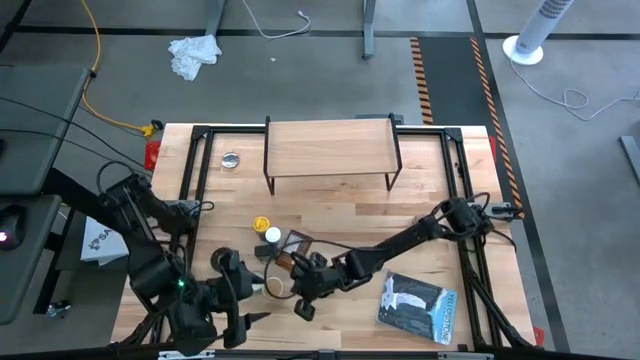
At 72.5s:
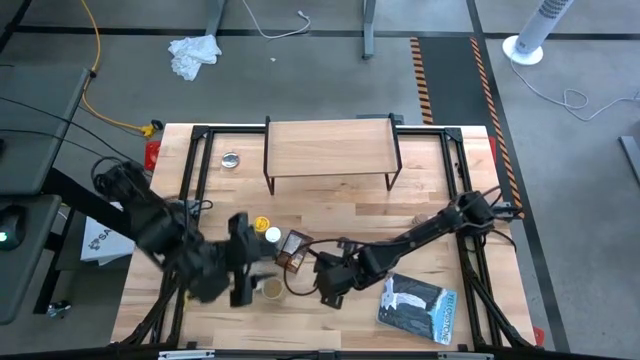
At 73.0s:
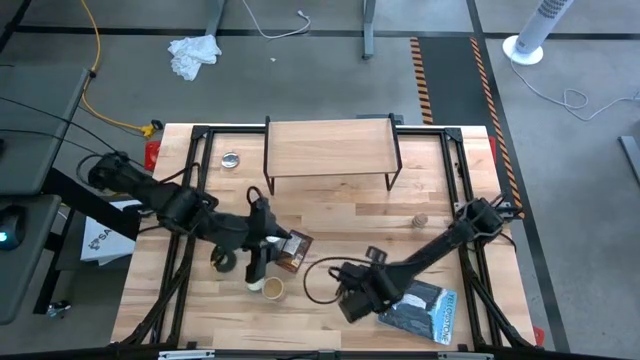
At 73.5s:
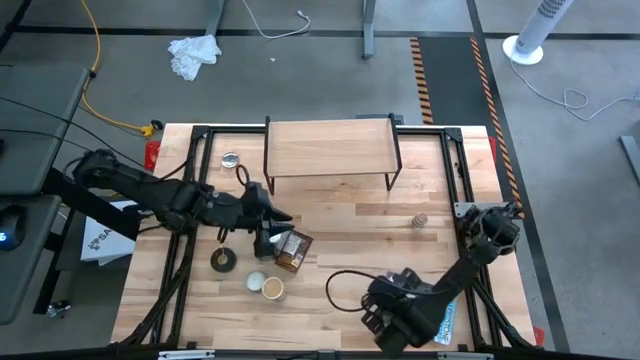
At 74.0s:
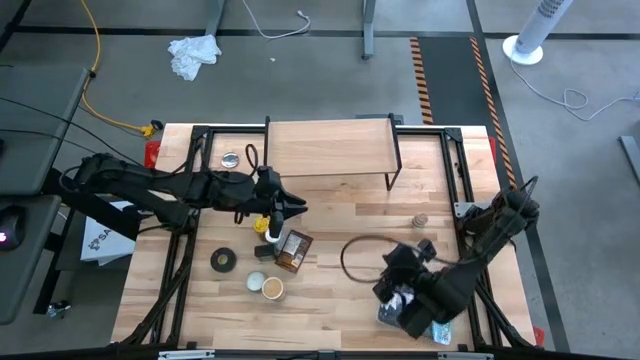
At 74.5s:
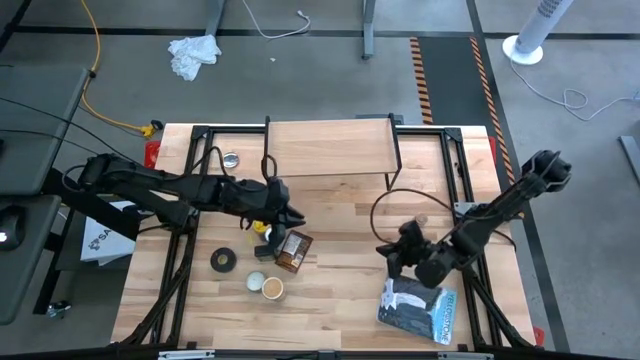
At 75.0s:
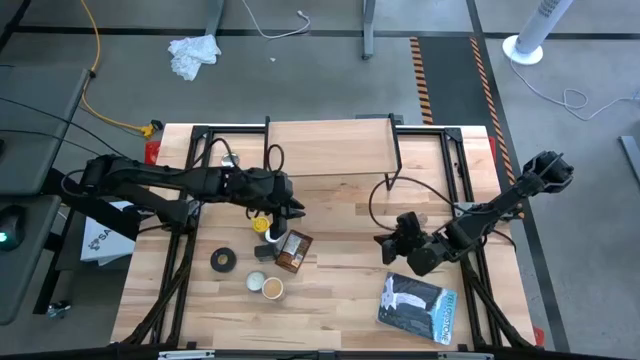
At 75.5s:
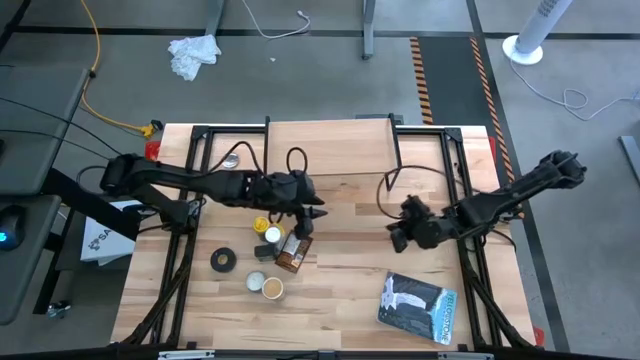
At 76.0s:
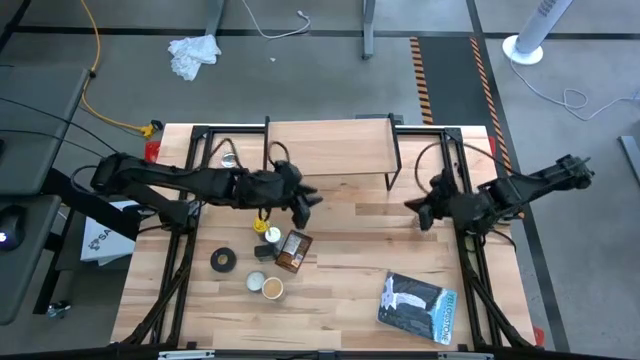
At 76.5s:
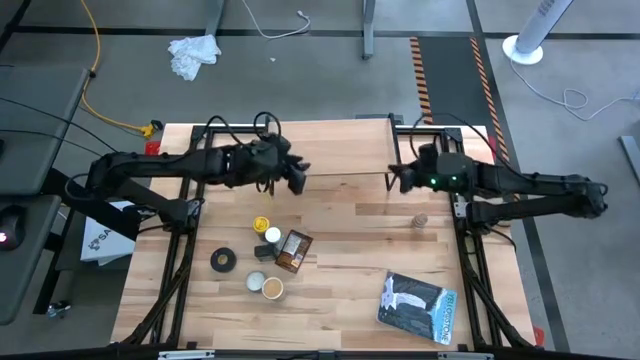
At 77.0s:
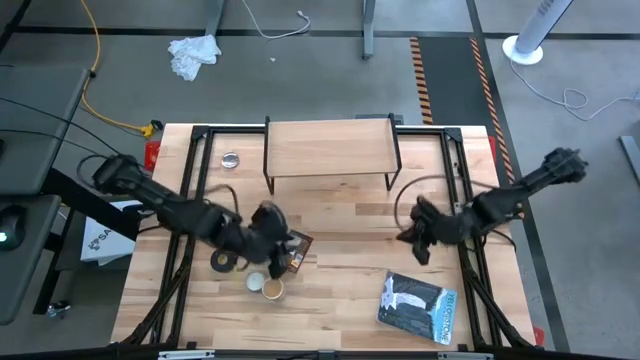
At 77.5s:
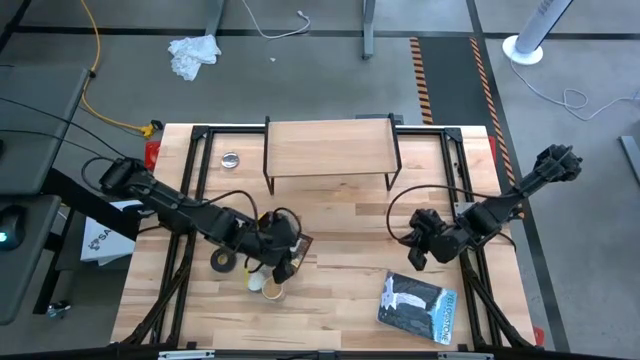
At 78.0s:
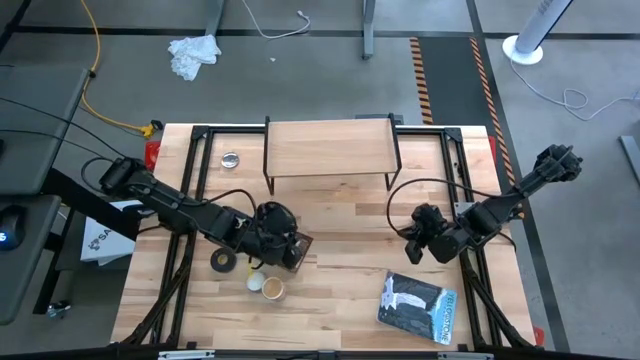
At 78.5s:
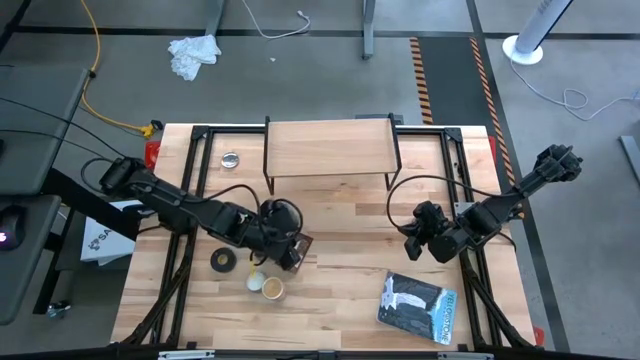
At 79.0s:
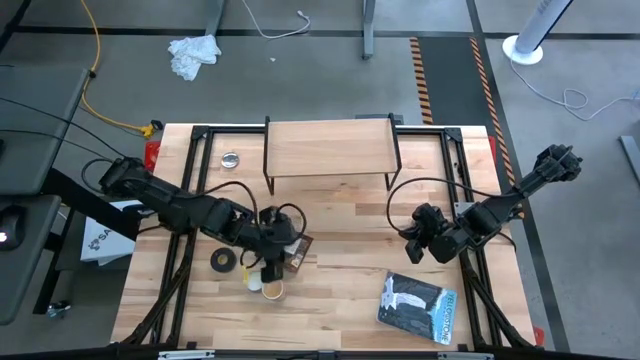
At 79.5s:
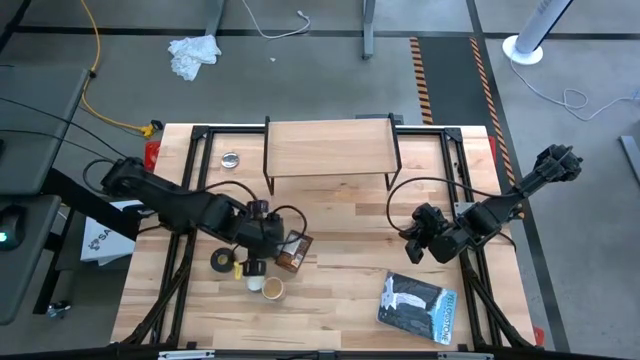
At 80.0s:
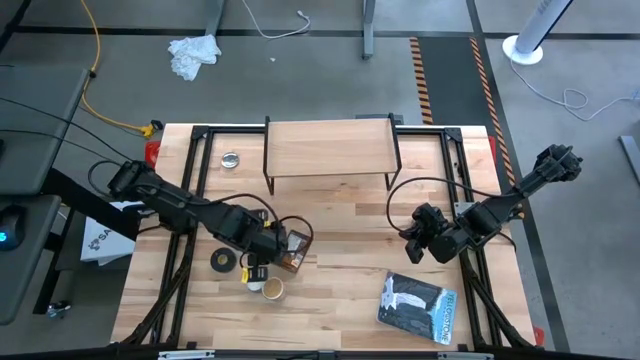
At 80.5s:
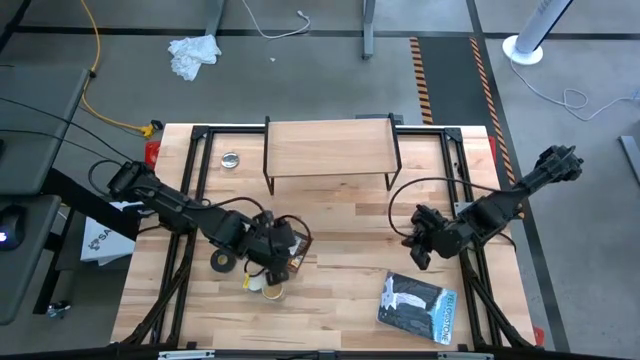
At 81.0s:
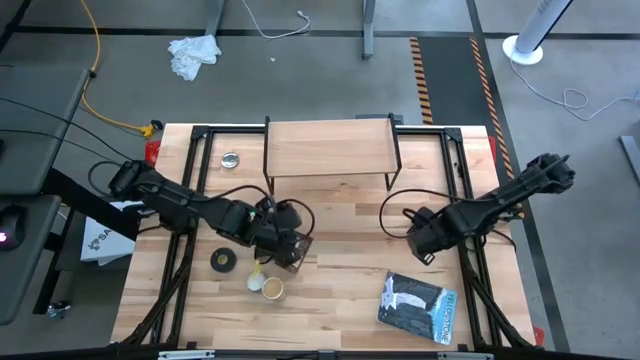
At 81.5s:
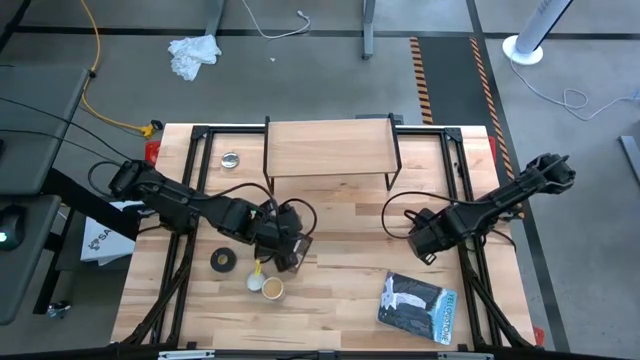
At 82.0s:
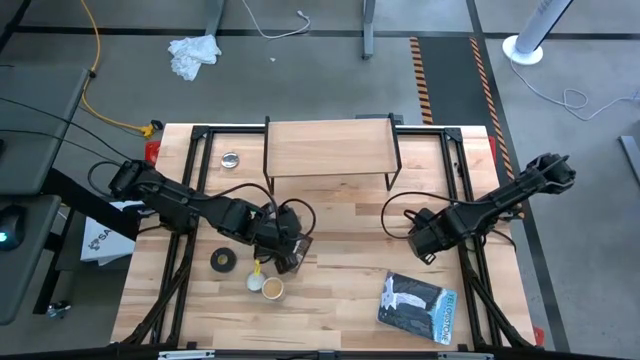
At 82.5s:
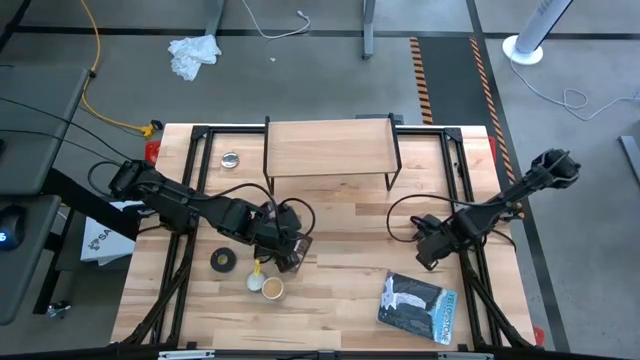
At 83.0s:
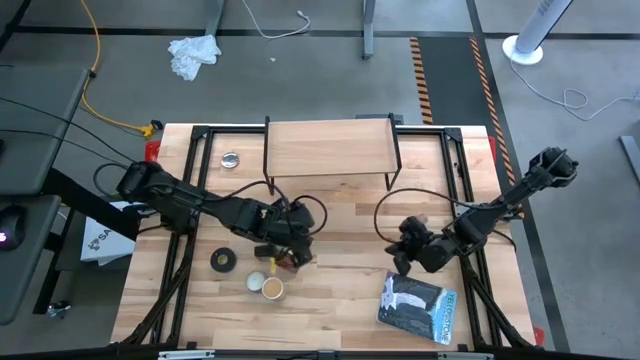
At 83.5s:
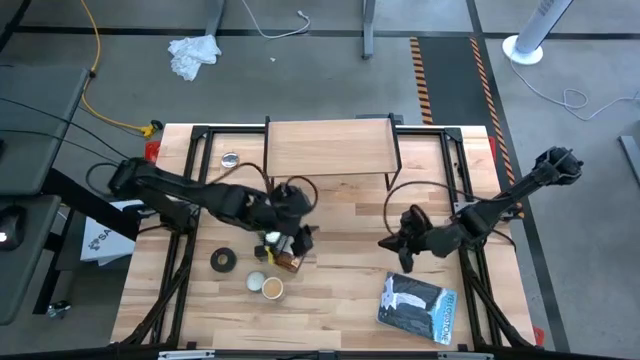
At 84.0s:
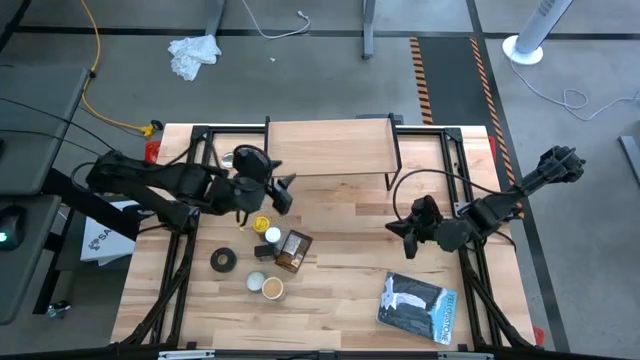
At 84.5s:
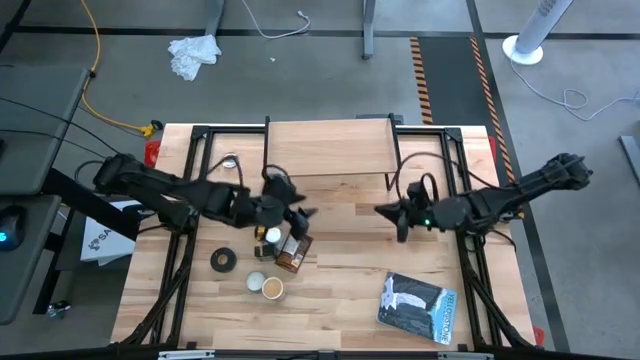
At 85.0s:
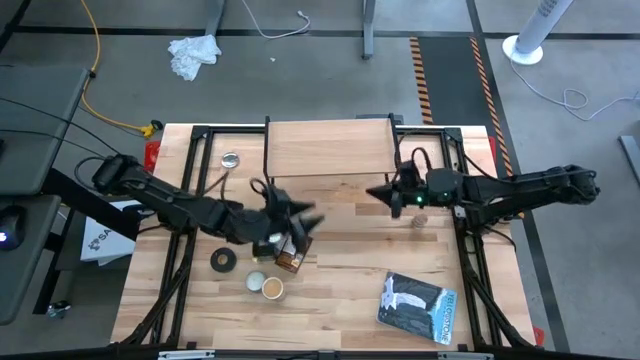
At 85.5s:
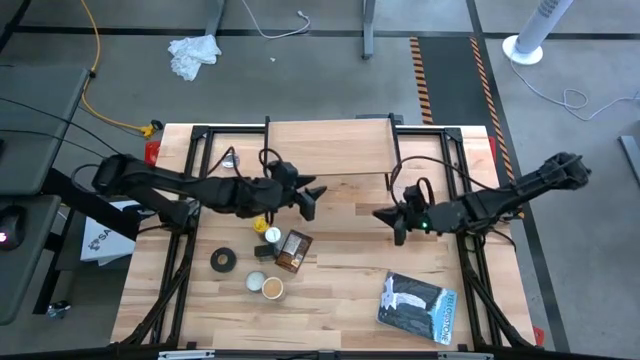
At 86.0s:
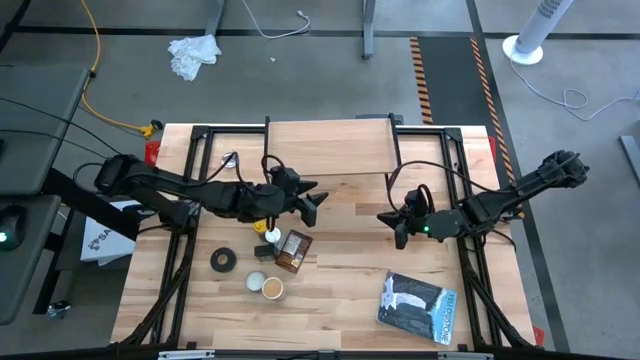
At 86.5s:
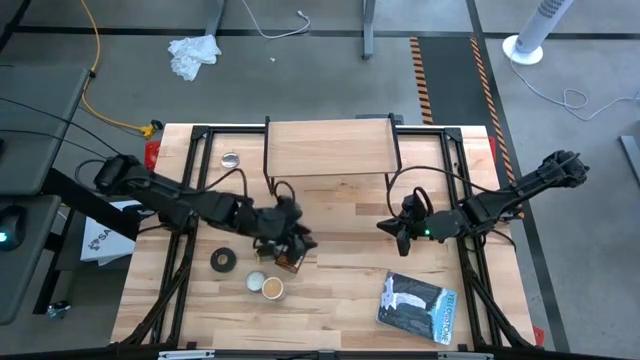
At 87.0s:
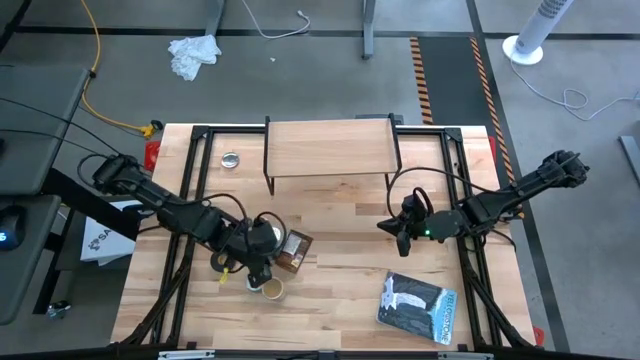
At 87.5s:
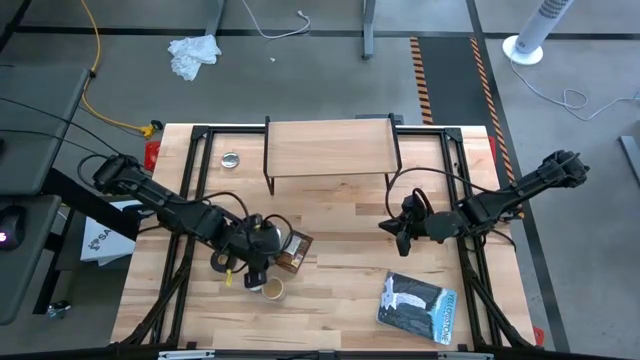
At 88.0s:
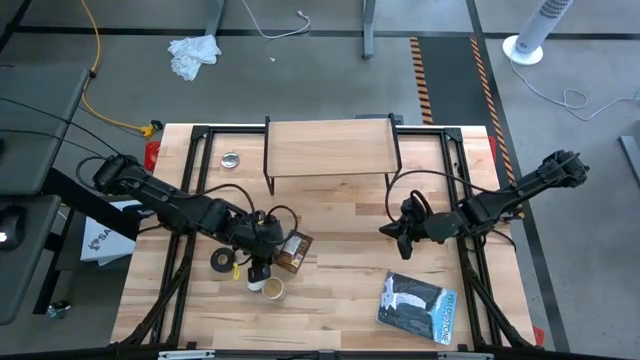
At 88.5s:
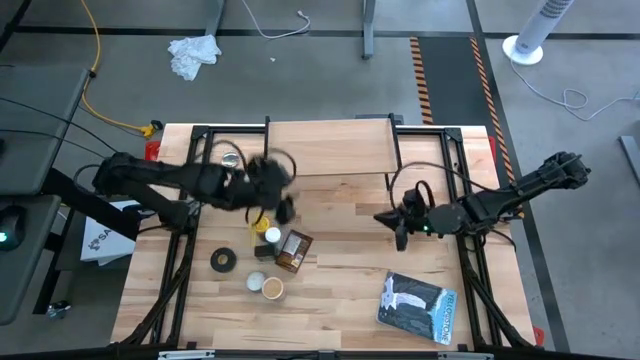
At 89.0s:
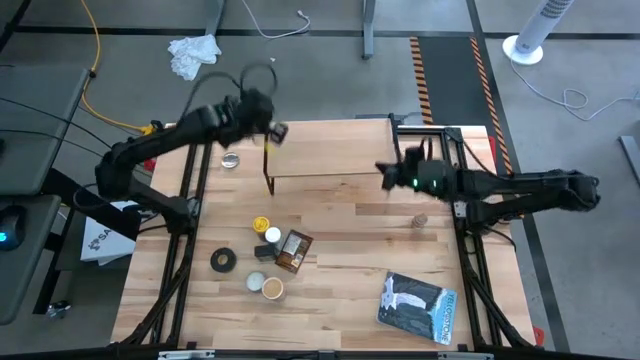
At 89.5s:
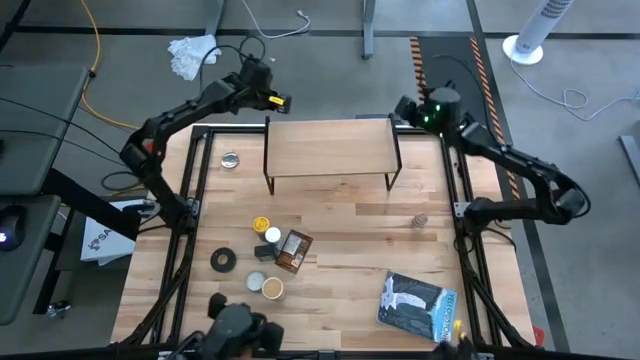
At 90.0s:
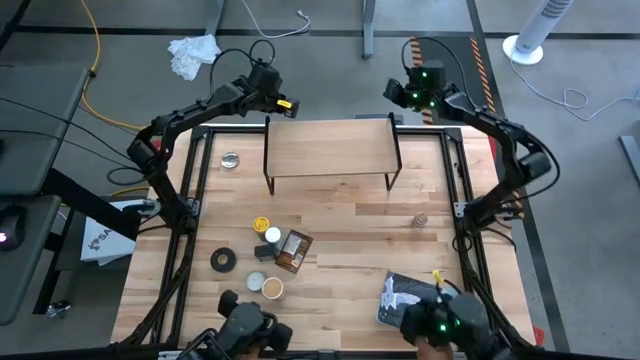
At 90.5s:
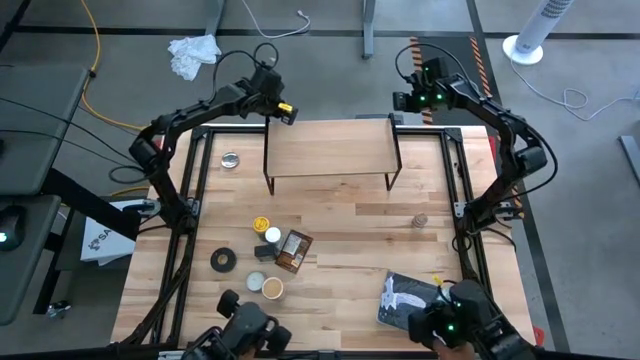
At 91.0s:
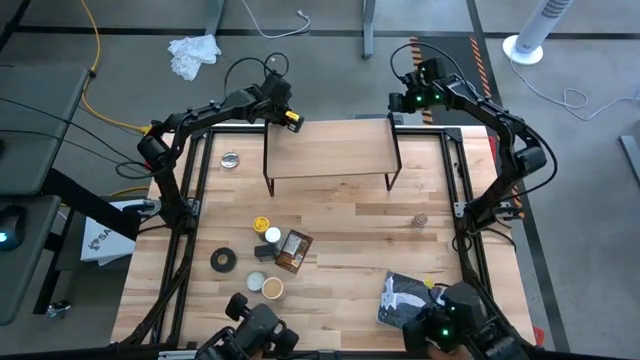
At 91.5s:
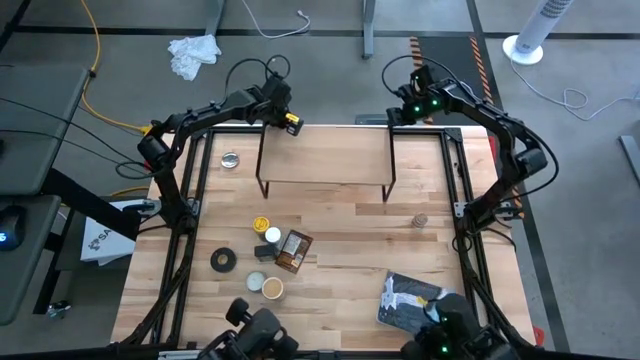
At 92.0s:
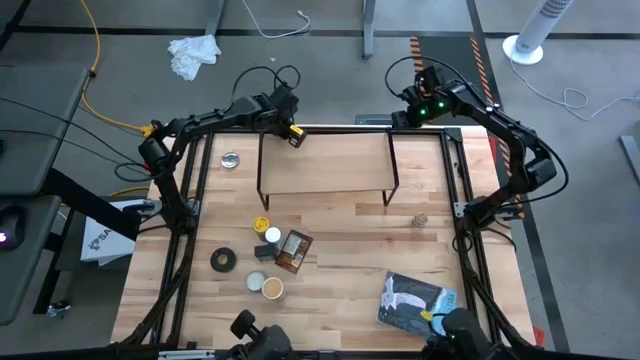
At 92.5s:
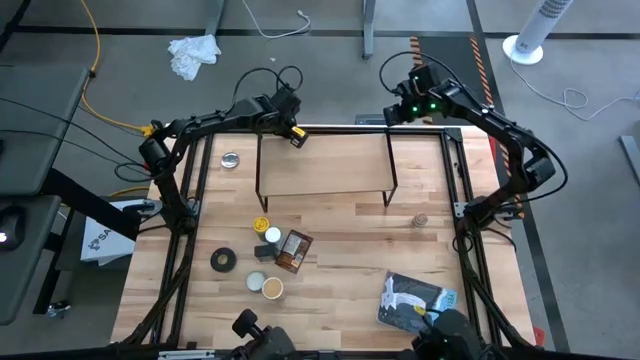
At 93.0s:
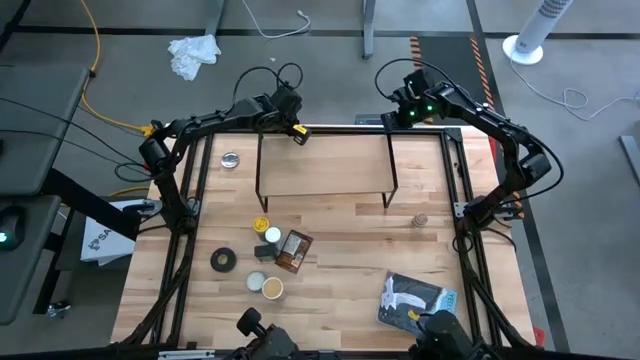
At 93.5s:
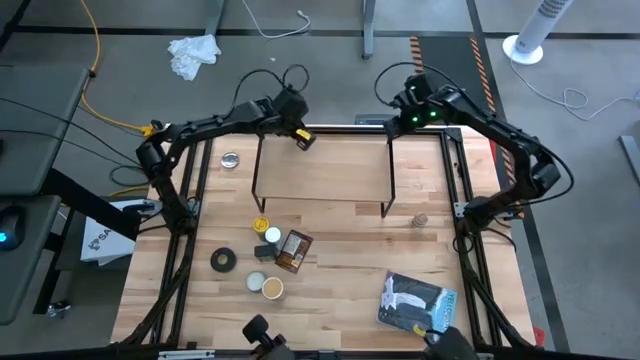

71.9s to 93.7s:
Task: Shelf spices
Adjust the shelf
